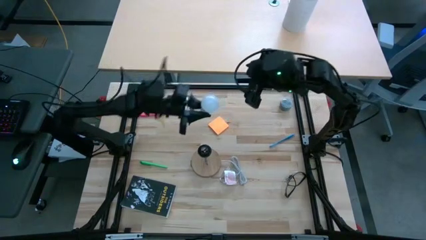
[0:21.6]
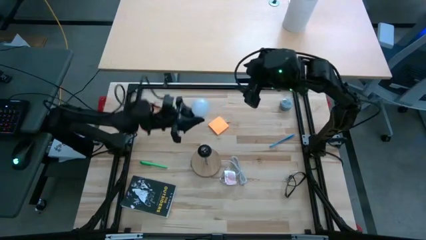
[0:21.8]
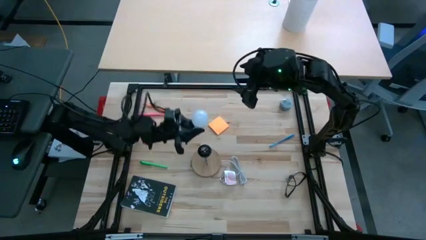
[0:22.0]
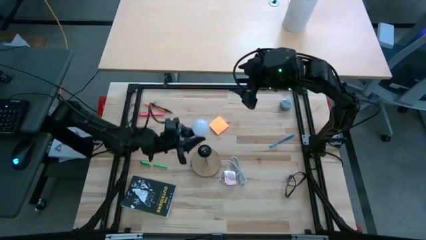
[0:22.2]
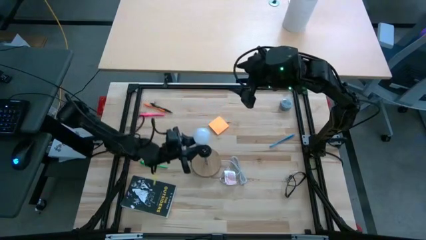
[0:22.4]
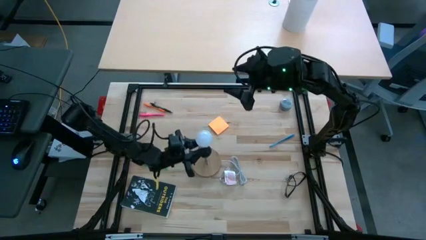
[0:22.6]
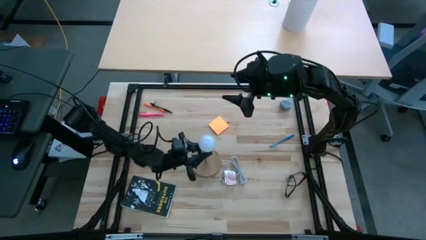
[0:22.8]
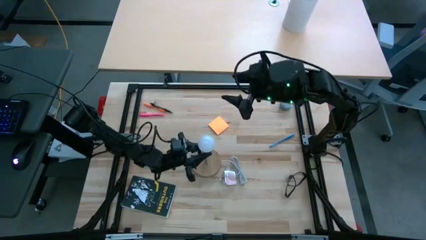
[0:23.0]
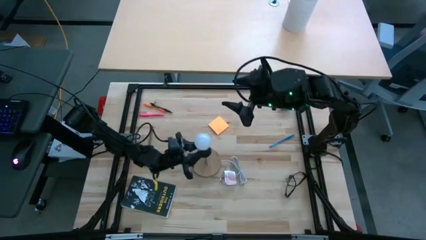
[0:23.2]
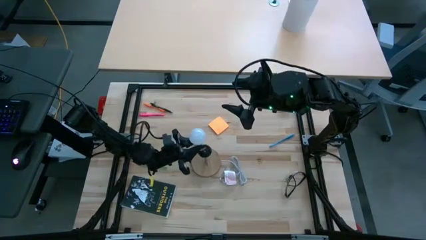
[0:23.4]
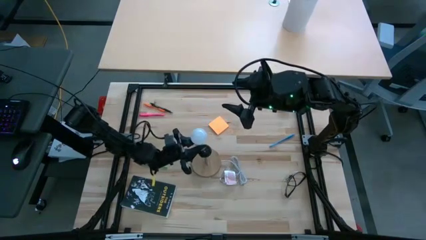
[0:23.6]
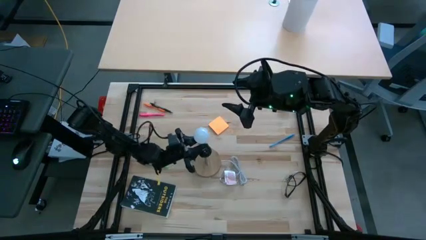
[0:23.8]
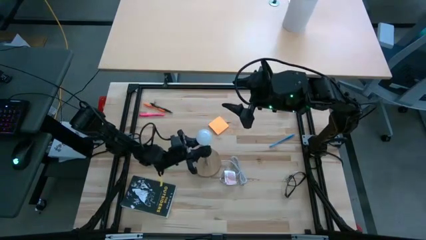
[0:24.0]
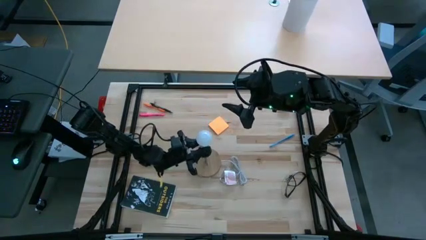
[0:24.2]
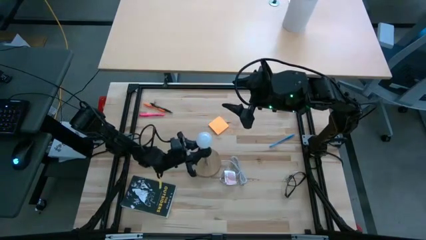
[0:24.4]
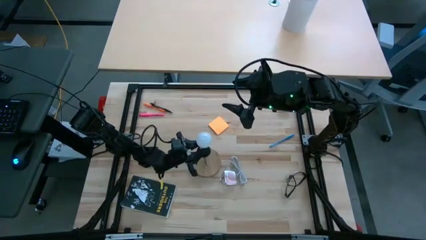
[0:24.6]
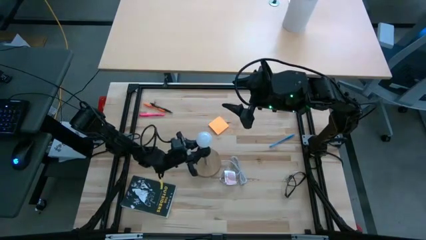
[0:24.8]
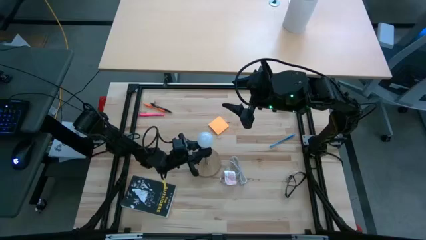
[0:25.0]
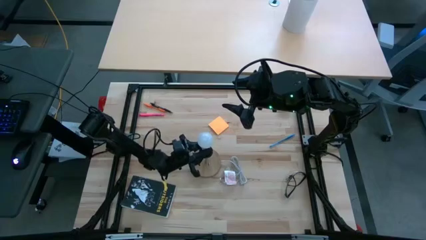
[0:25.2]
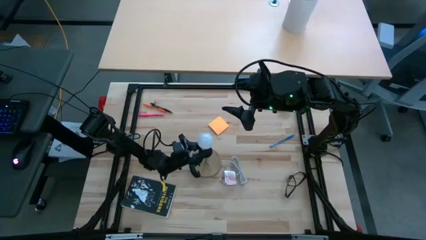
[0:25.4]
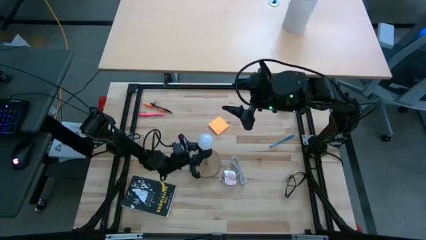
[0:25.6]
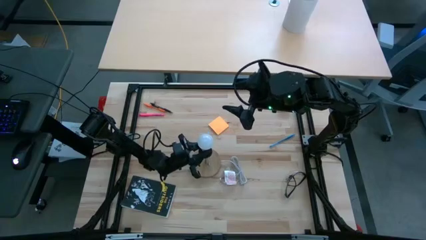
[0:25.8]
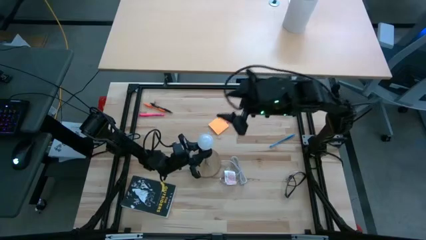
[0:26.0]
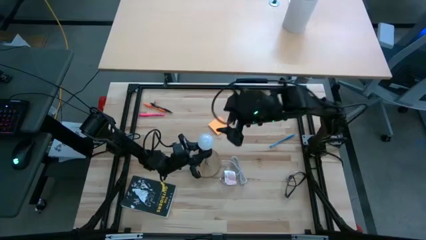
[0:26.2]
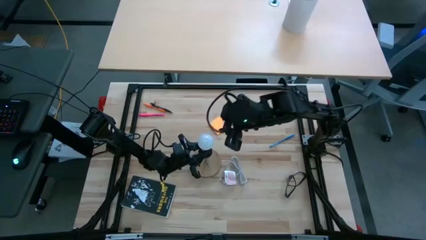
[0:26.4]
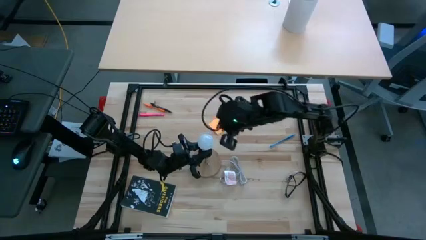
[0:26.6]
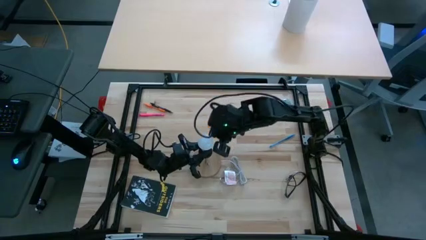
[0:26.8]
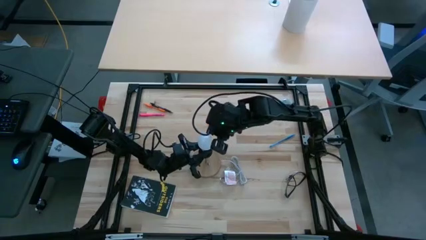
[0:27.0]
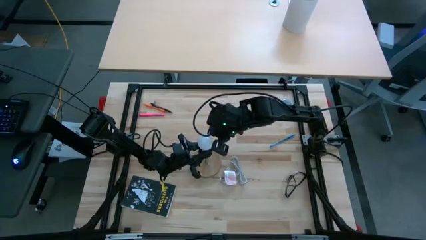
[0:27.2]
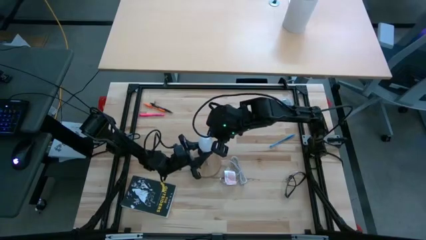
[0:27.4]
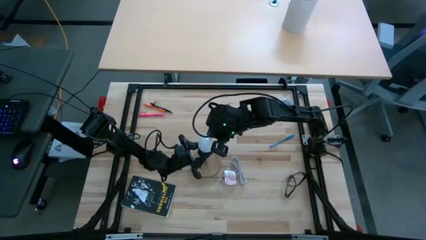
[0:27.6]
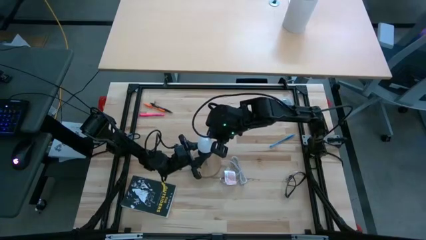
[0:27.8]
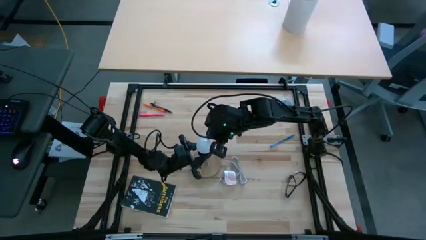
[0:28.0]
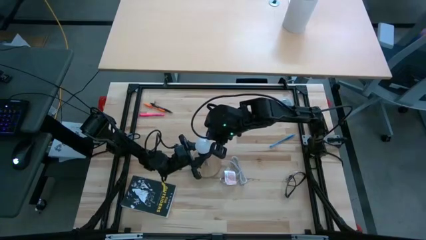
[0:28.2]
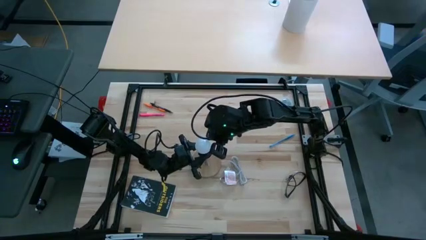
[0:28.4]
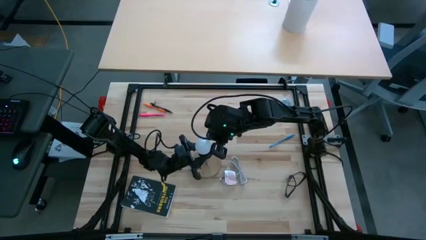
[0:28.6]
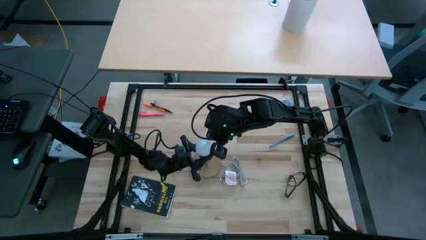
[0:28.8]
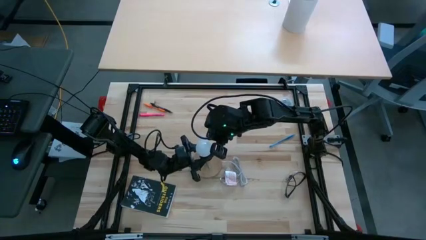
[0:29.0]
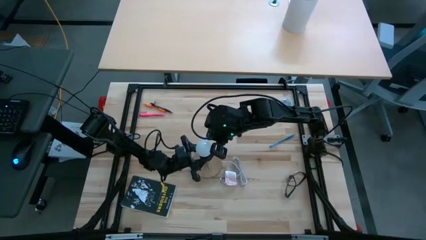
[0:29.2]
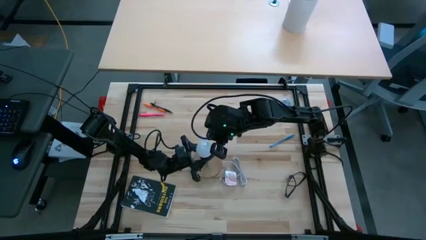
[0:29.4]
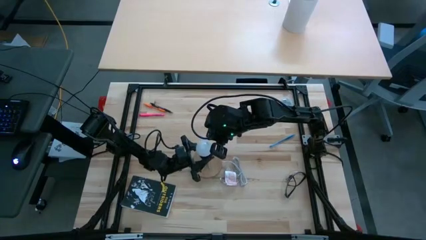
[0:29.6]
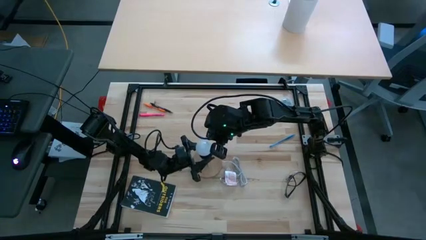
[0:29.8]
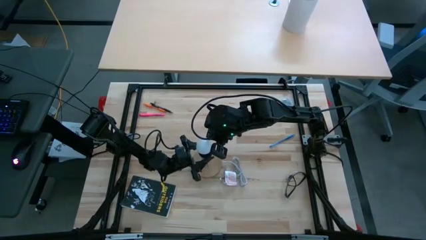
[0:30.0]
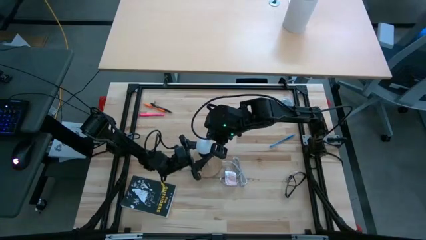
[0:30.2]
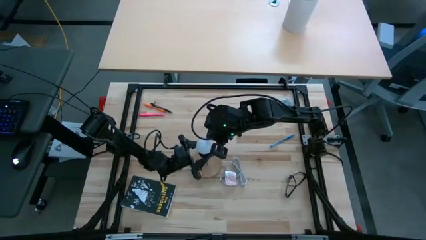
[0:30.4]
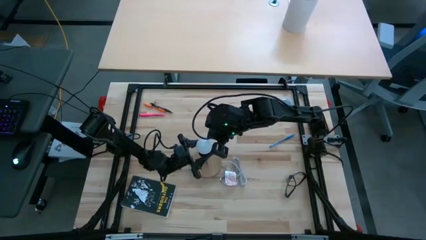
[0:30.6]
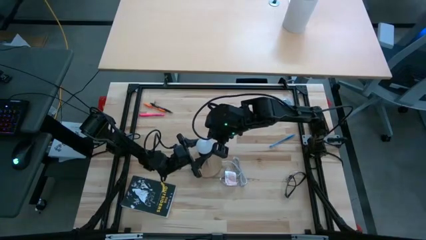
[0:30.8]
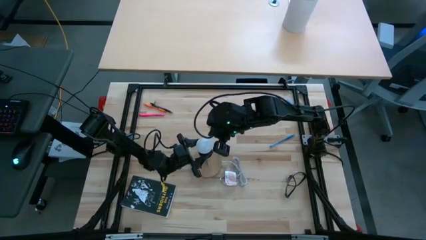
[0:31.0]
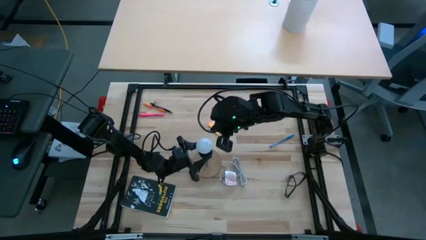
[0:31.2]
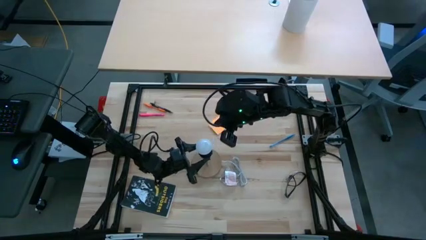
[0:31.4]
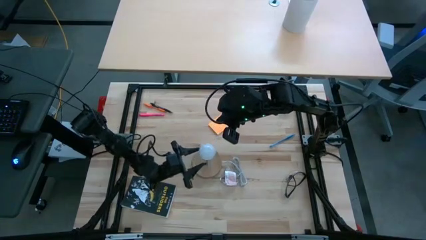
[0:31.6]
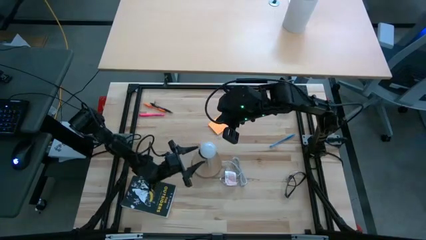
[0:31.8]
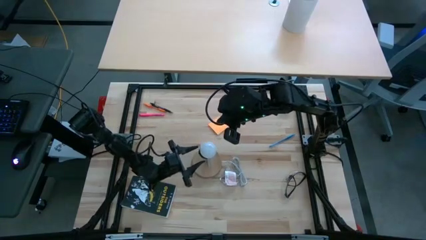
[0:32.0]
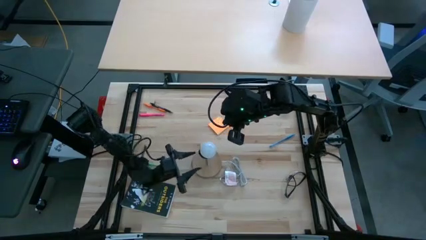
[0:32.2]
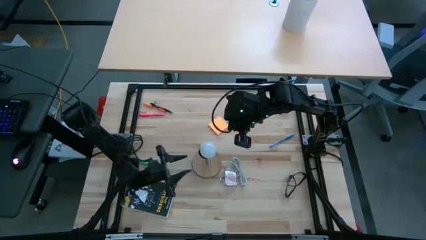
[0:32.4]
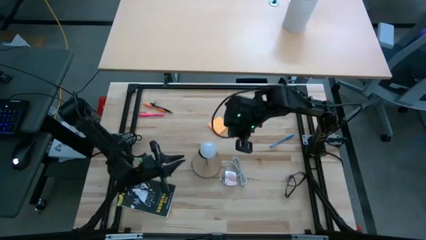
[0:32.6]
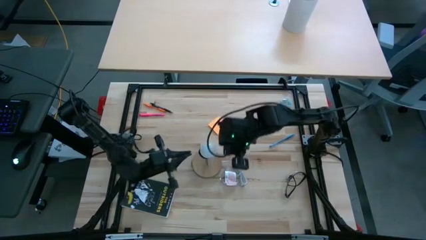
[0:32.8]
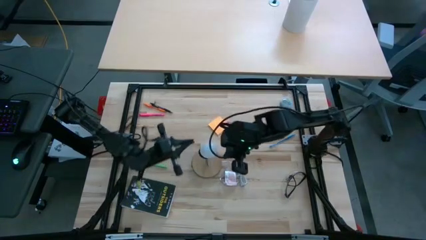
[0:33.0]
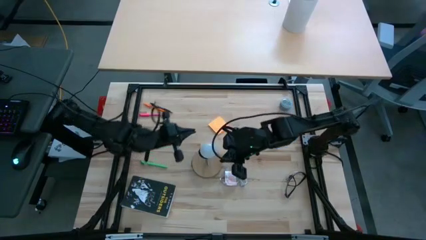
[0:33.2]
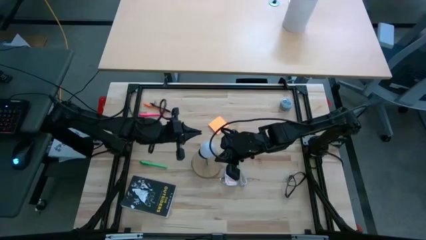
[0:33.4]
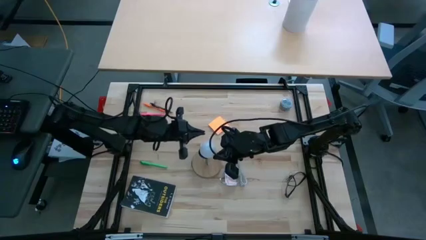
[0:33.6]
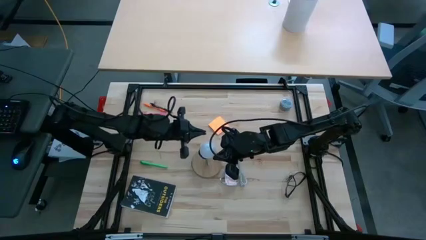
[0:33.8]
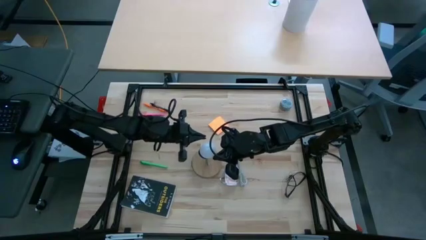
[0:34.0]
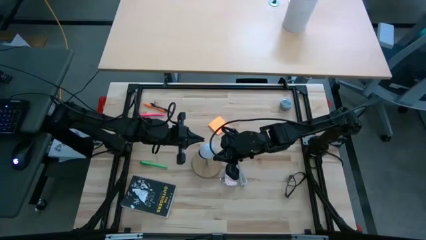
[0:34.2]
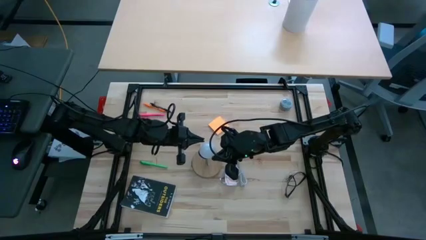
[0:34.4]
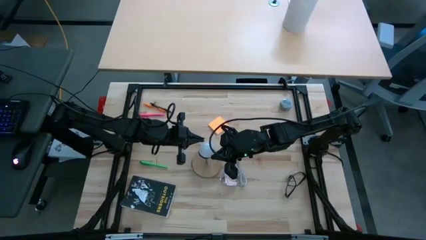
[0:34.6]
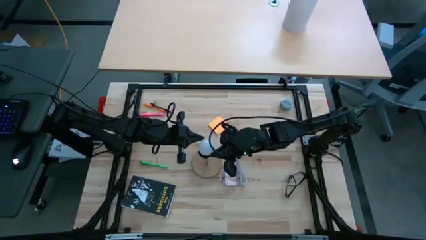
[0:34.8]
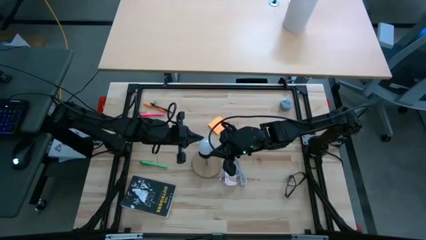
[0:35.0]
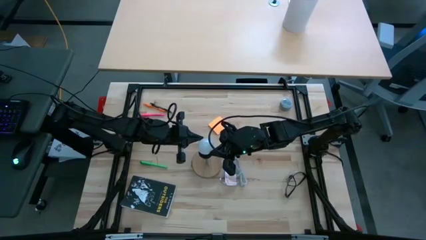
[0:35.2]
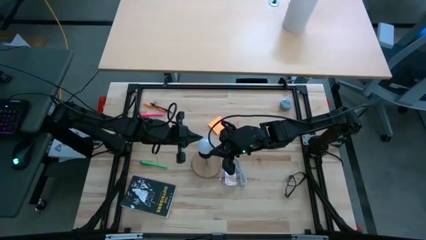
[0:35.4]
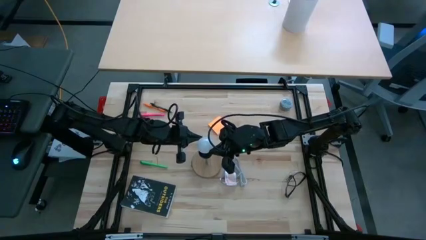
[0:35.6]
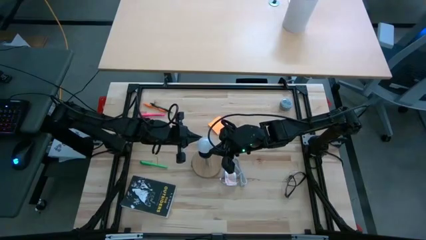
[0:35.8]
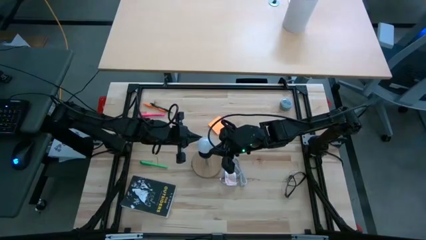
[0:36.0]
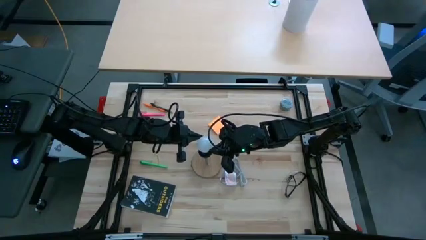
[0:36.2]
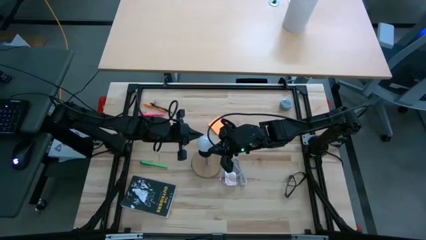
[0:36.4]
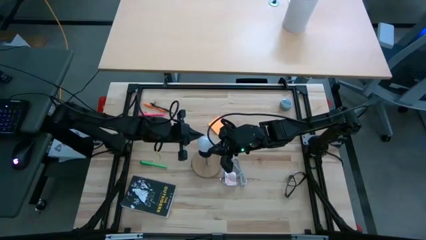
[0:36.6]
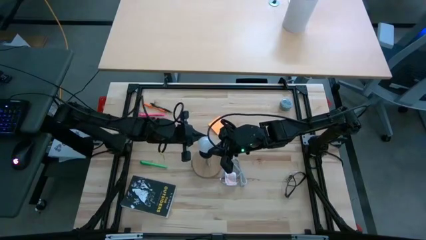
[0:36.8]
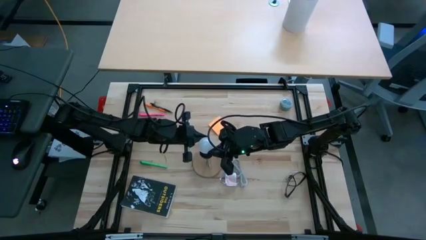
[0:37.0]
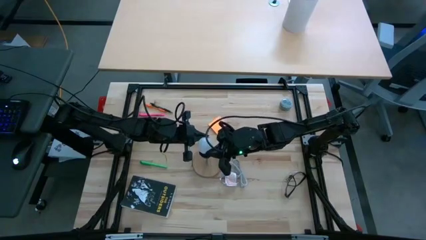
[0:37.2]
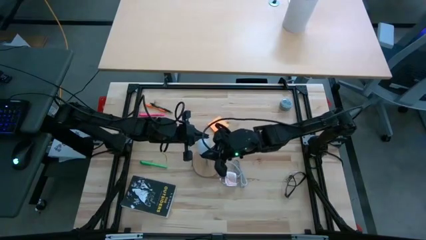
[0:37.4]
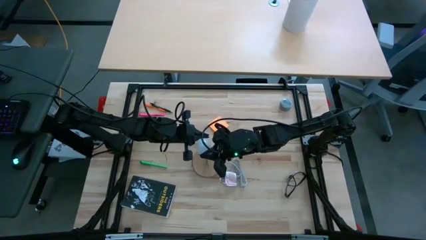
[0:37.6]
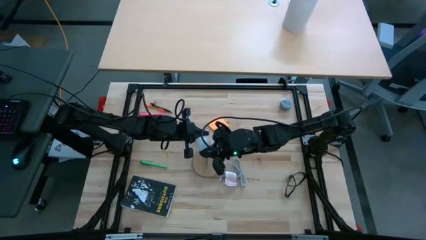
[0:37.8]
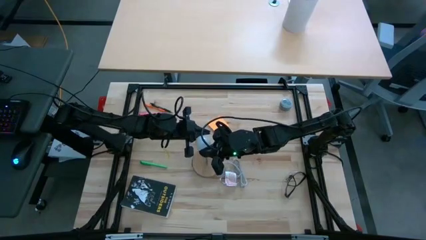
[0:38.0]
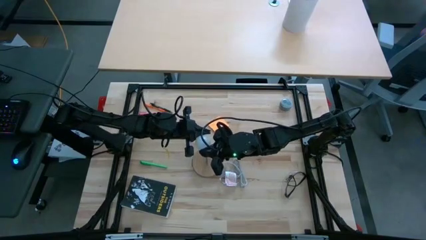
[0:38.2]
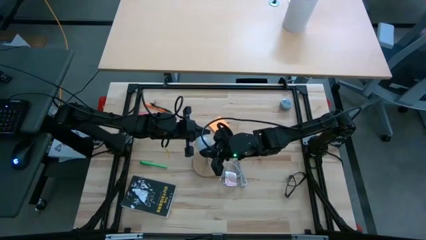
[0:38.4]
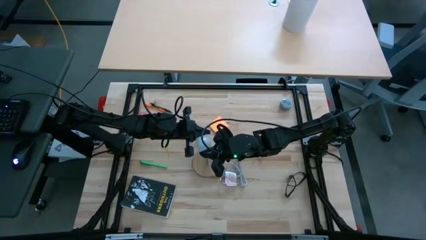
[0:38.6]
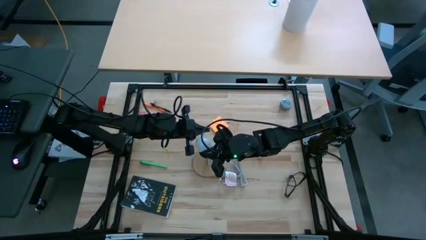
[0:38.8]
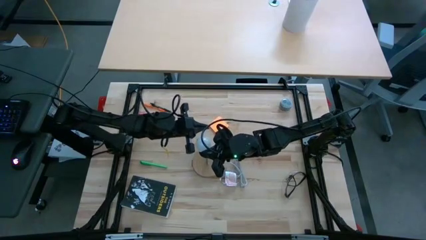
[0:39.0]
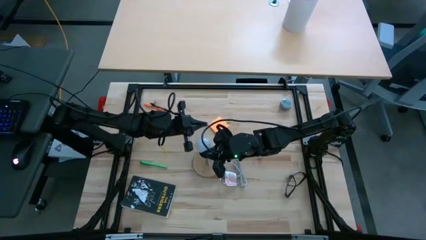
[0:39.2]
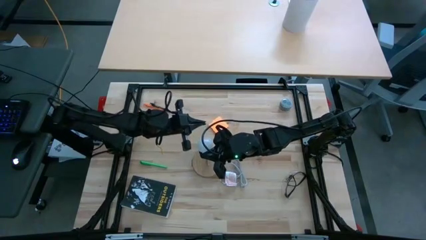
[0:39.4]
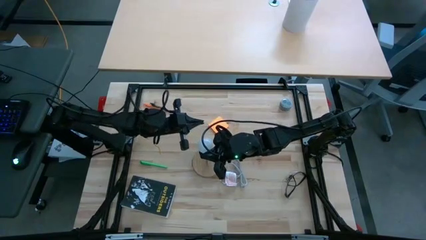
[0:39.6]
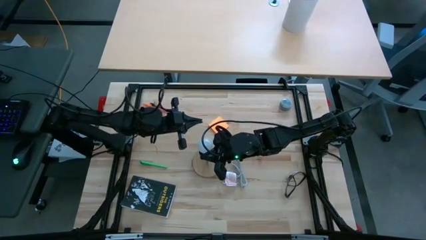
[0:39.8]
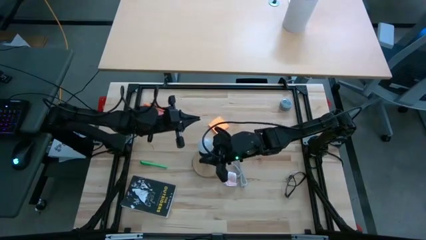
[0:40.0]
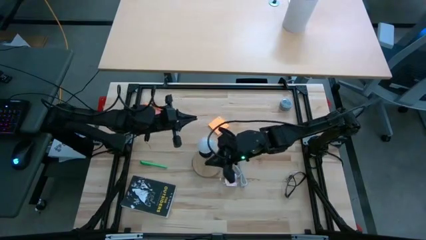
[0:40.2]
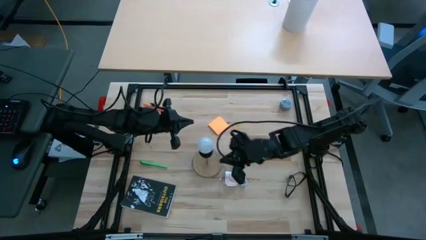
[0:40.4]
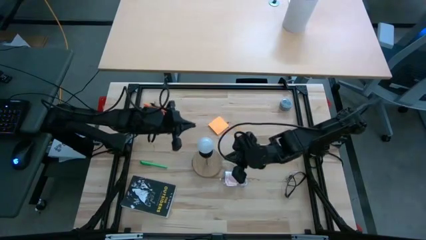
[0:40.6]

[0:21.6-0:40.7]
Task: Screw lightbulb
Insert the white lightbulb into the lamp
